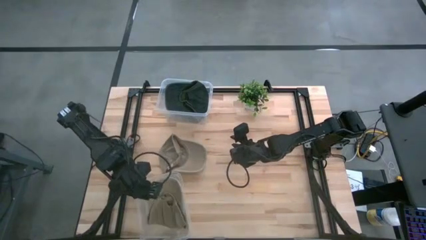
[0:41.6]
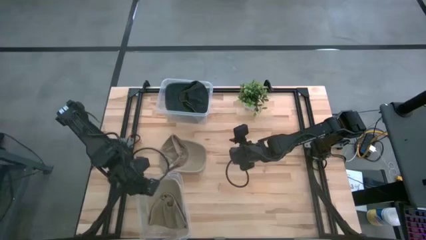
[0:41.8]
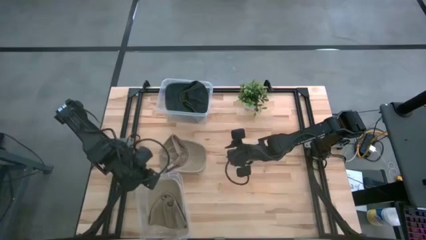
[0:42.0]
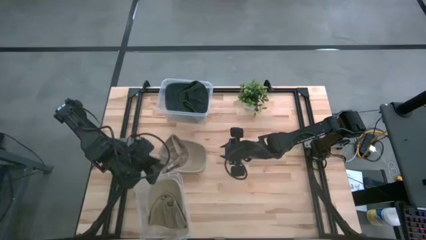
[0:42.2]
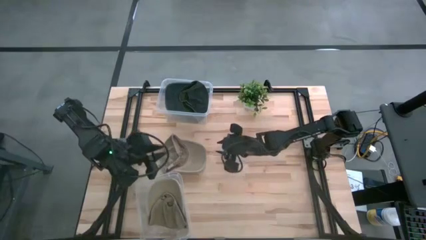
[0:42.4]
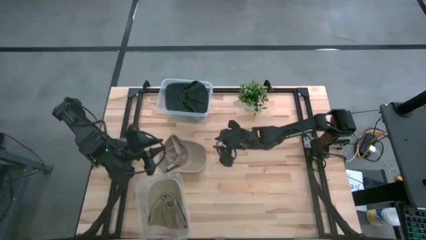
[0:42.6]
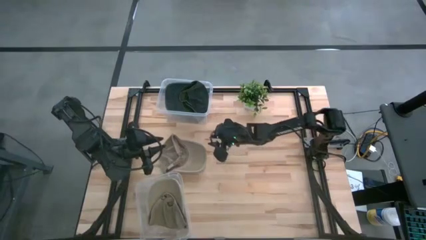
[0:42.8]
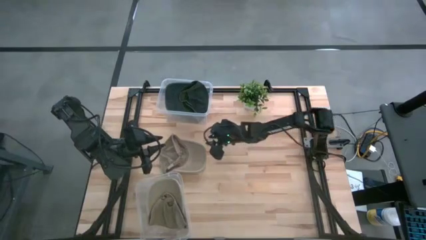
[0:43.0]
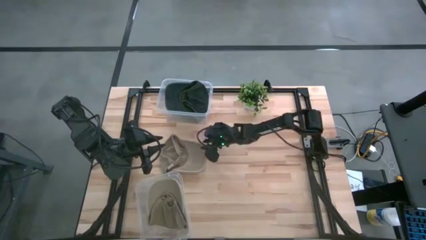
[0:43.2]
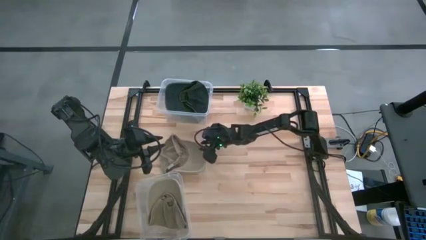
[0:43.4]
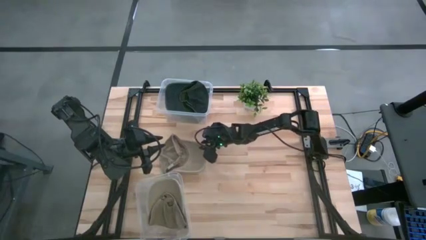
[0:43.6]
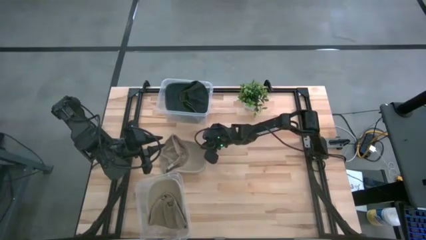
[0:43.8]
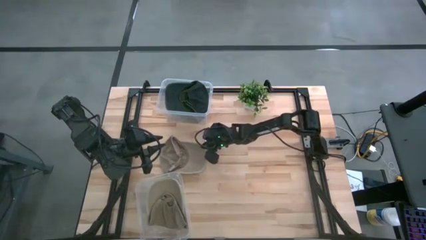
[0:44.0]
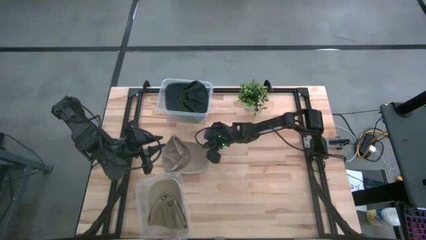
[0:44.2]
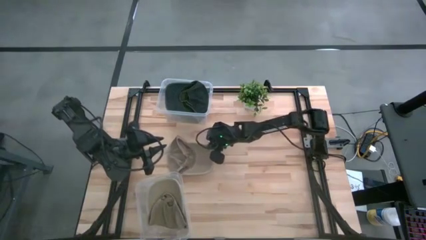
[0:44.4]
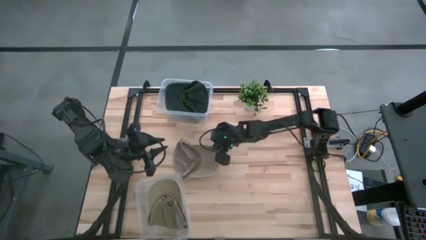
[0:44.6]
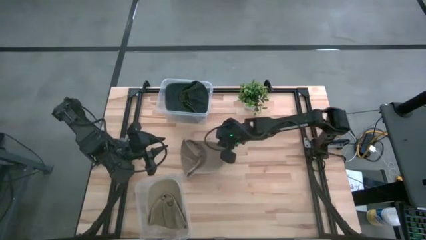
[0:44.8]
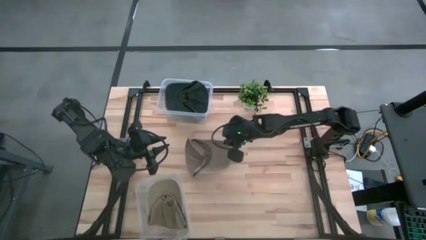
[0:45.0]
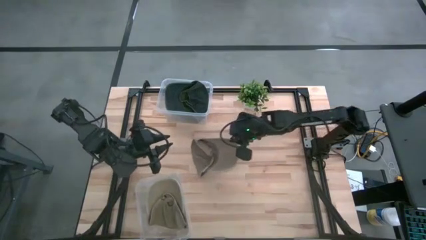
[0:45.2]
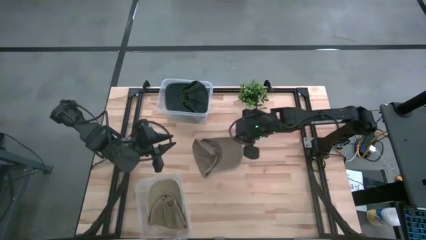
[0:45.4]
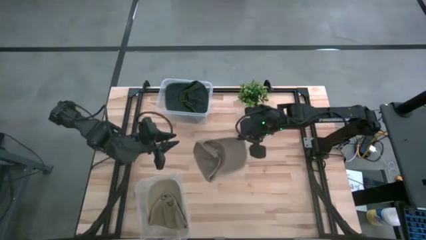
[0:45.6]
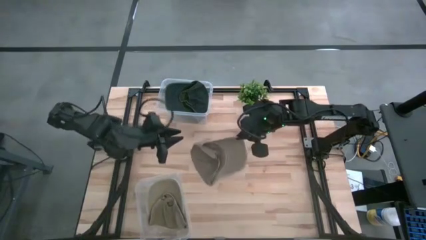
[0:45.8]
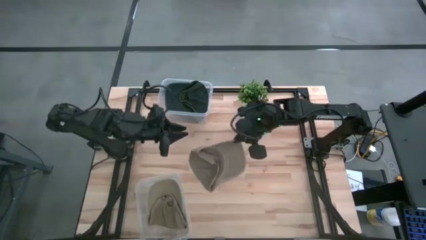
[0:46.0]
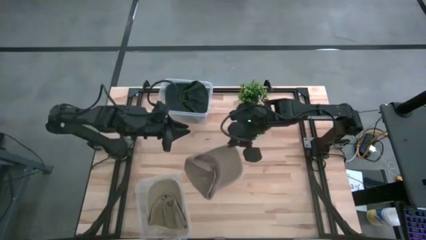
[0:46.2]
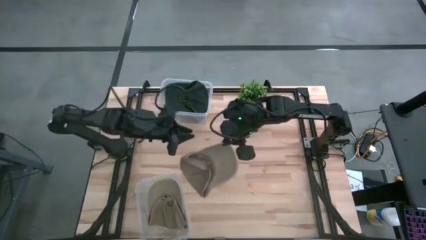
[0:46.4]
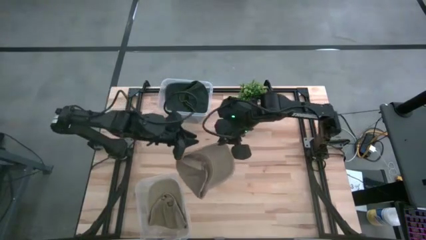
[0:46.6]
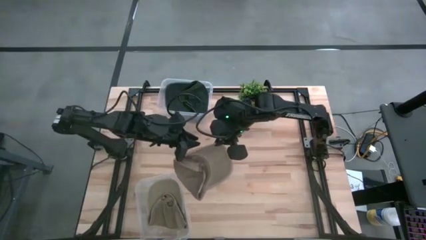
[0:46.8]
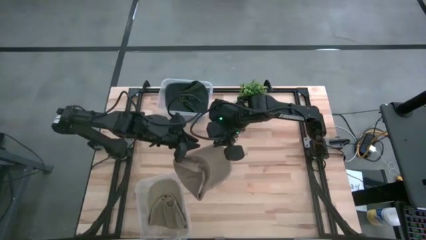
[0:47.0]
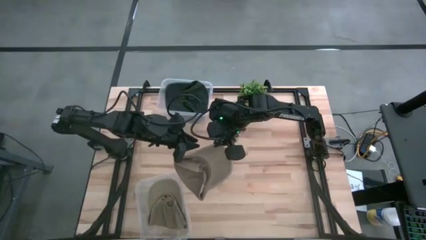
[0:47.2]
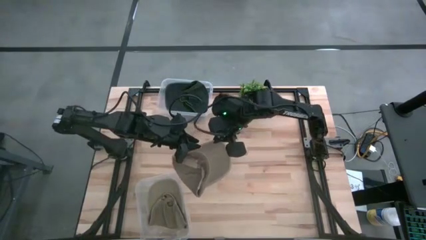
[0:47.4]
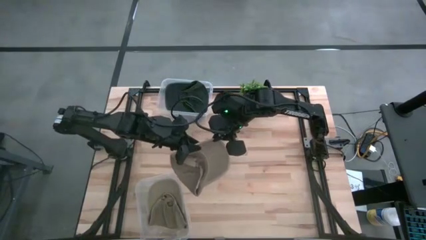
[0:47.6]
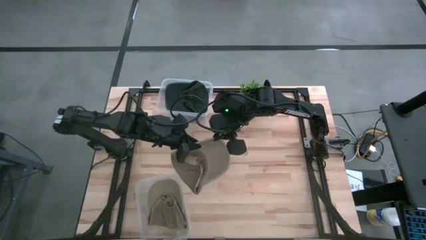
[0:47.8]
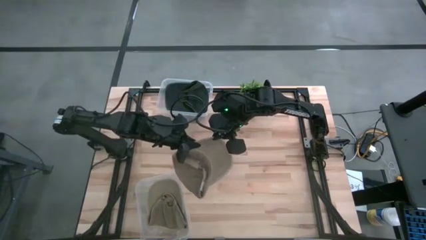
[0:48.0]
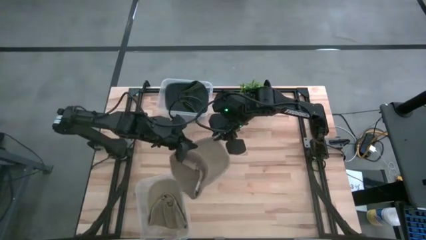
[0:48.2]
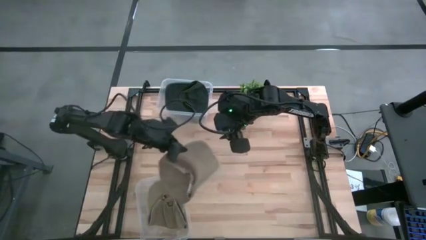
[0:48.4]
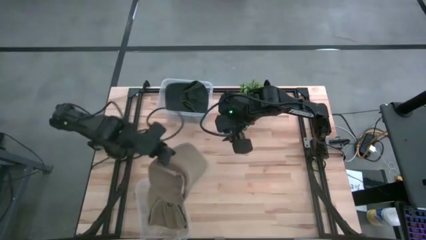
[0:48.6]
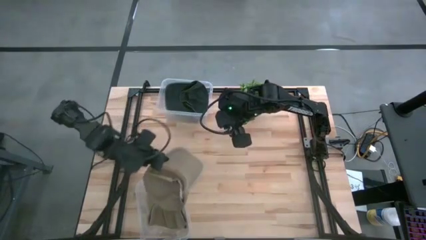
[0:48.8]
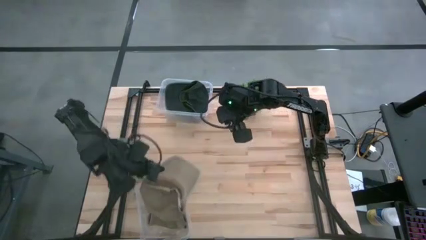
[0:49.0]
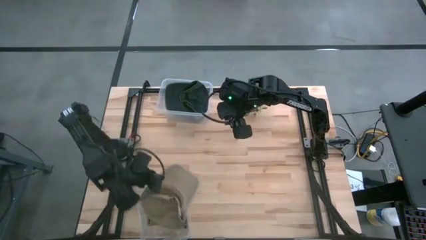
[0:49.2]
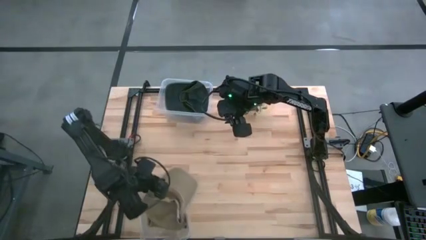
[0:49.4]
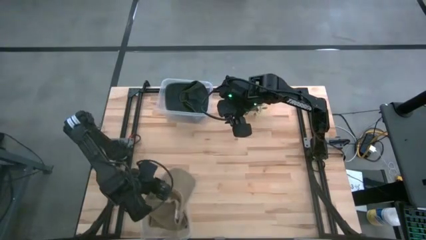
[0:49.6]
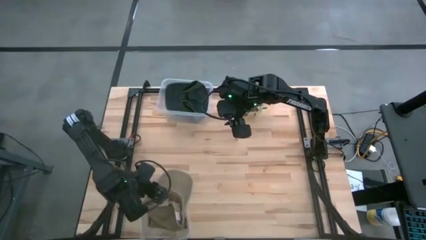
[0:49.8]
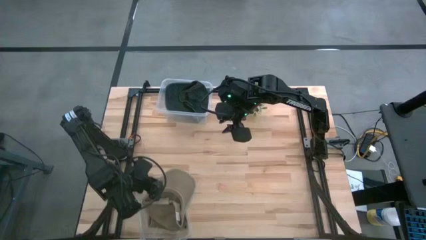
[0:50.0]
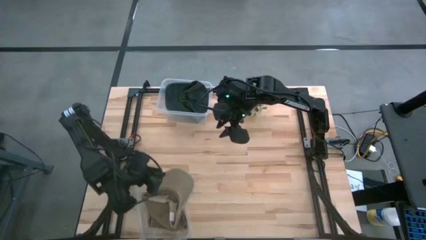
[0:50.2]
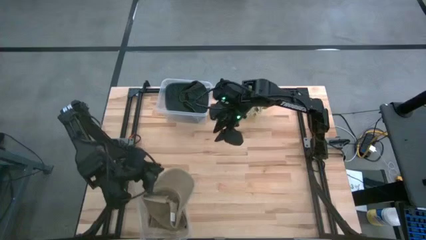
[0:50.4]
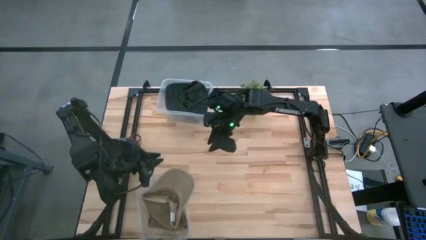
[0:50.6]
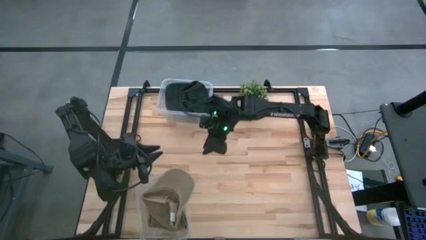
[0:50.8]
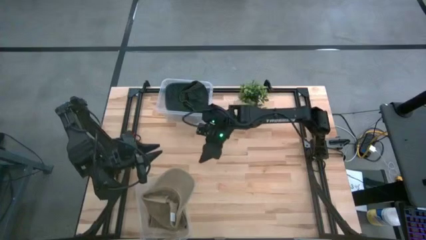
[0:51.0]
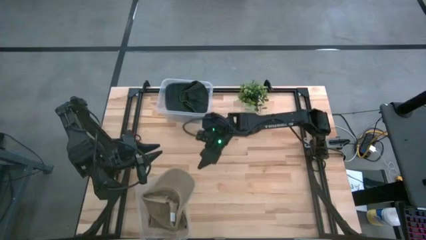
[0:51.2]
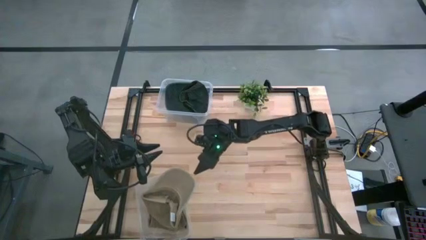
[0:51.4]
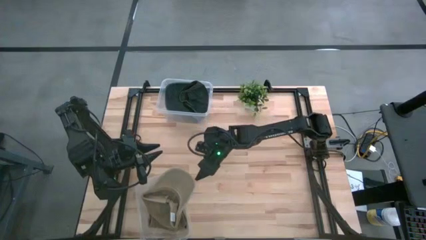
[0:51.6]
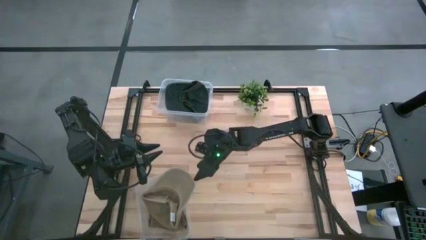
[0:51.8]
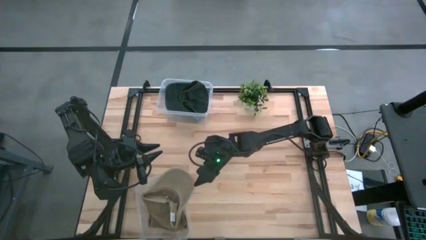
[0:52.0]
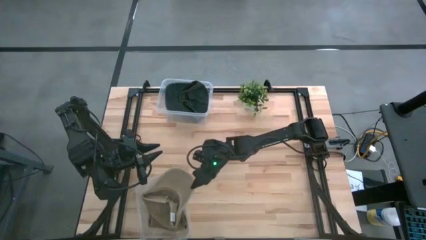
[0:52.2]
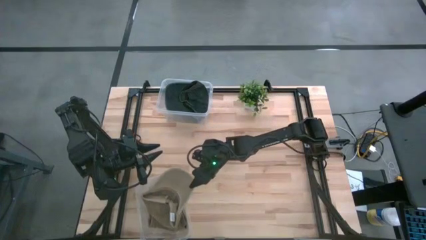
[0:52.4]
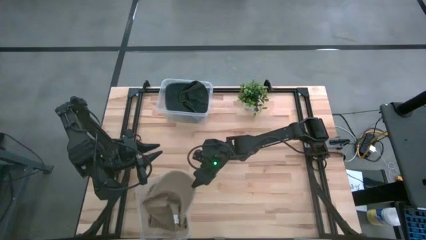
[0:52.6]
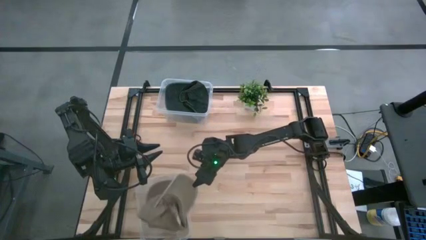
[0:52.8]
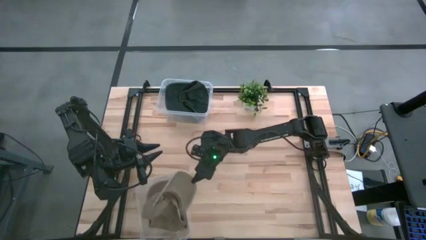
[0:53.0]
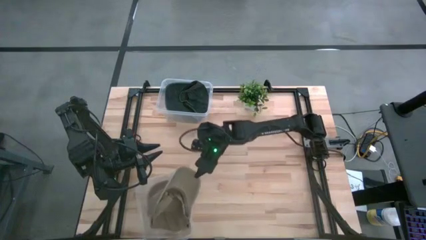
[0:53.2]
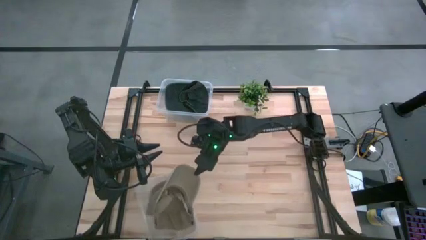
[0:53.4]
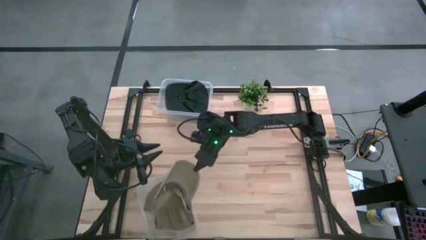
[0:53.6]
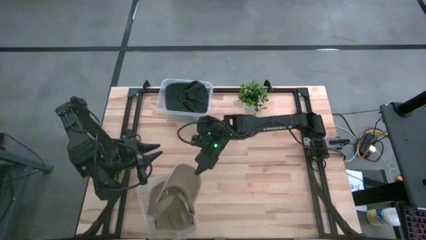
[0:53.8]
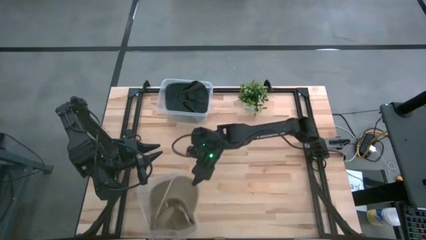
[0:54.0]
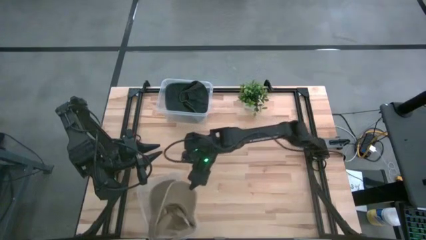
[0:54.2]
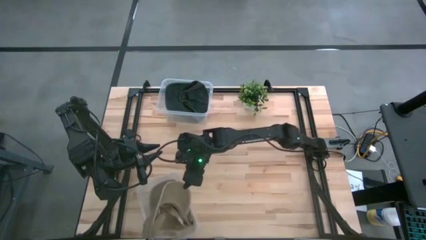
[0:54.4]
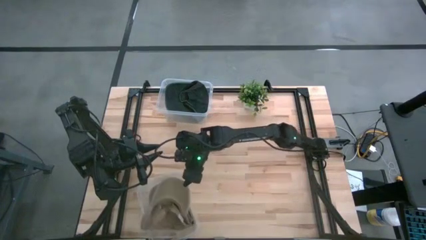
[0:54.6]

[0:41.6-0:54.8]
Task: Pick & Place hat
Put the brown cap in the bottom transparent bin
